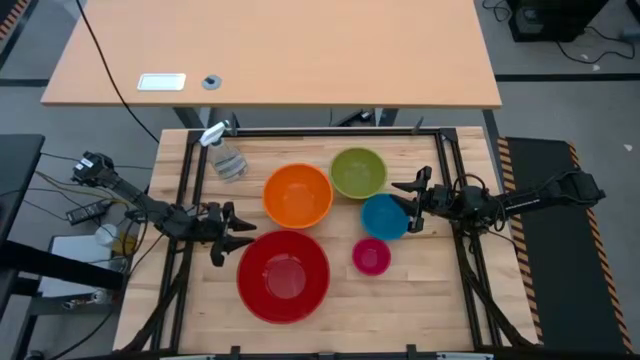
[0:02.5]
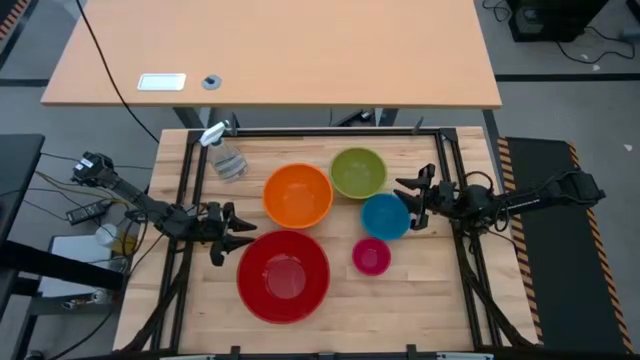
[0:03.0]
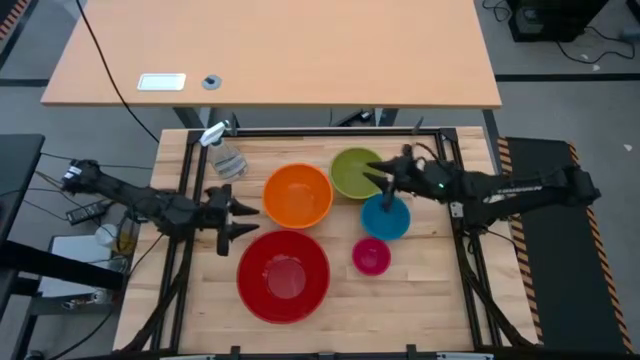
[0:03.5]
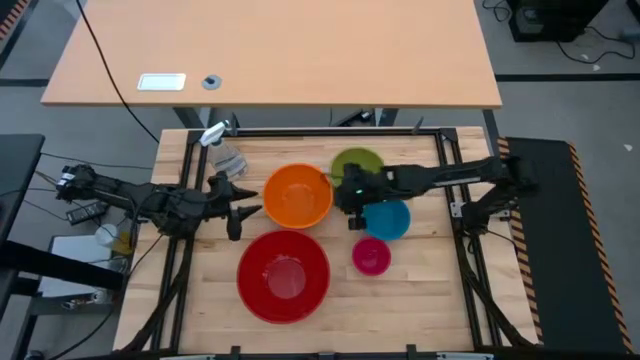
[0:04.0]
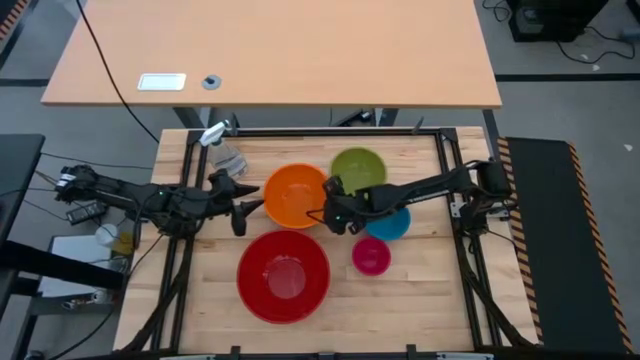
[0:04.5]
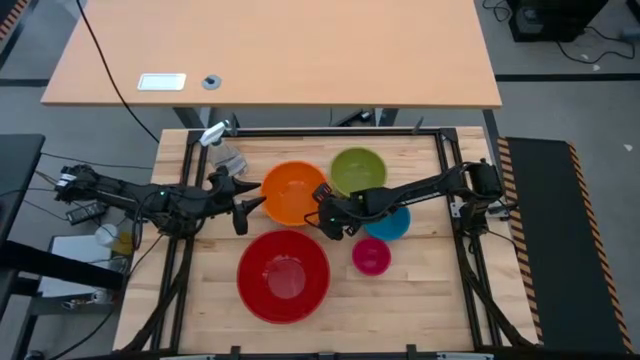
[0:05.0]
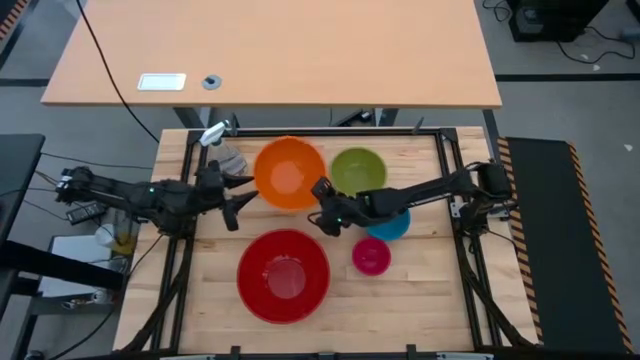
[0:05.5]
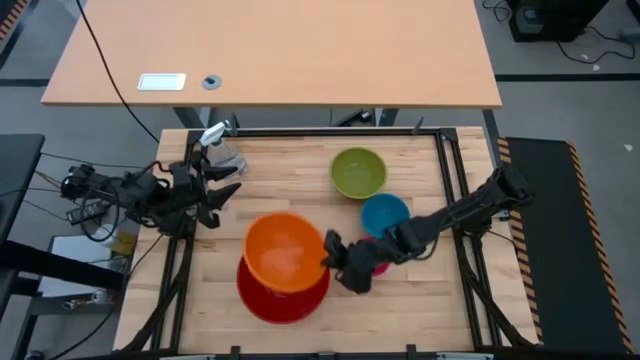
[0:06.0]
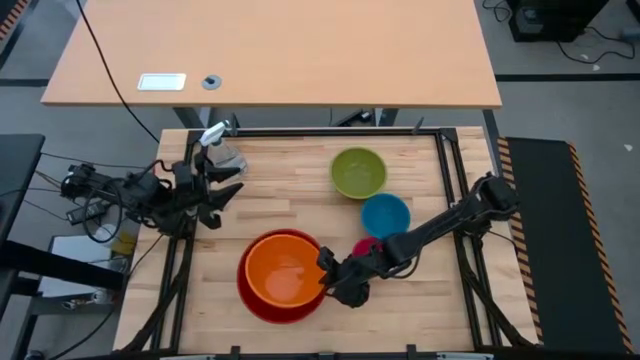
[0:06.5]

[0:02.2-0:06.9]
Stack the orange bowl on top of the red bowl

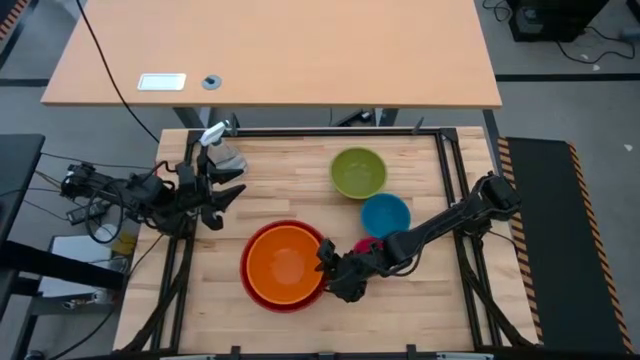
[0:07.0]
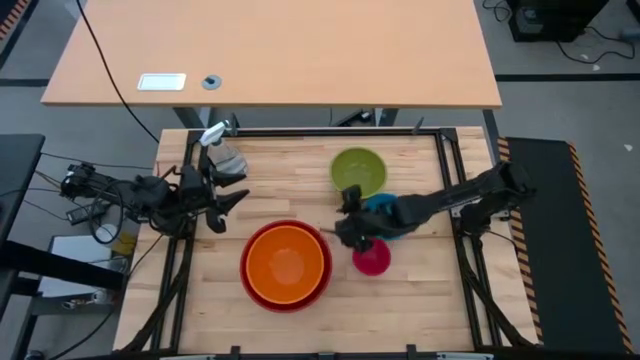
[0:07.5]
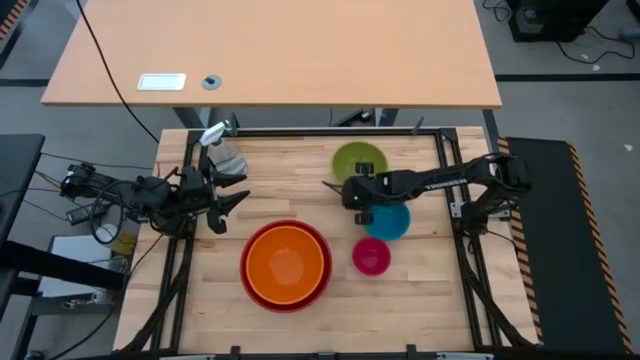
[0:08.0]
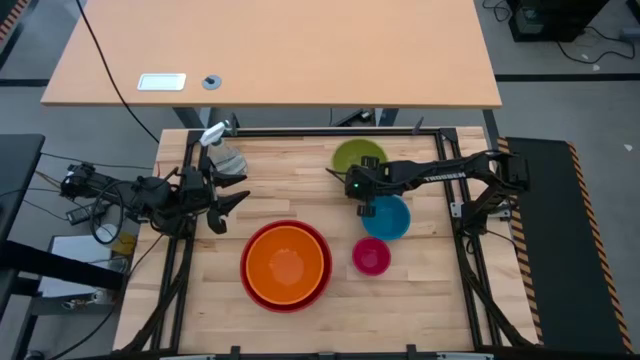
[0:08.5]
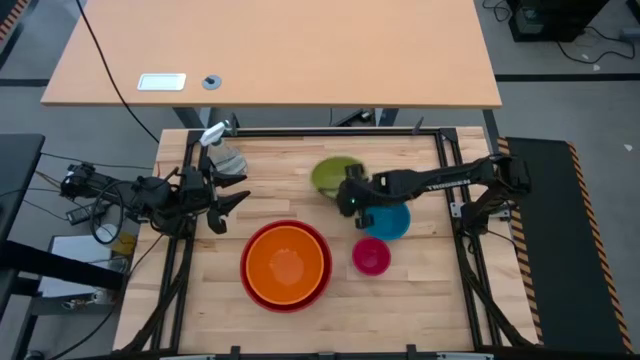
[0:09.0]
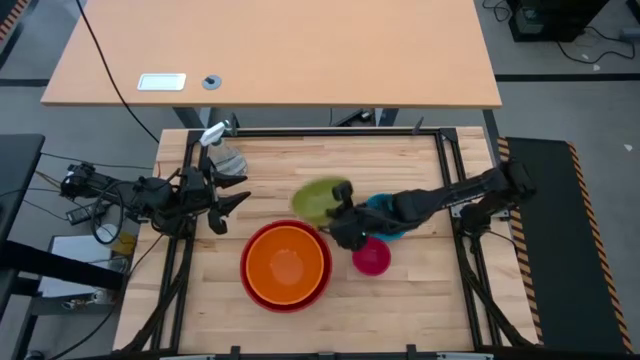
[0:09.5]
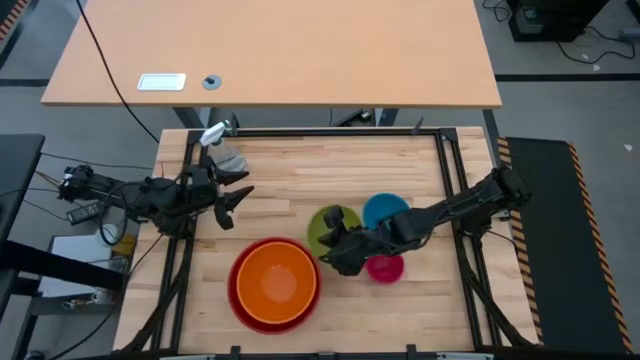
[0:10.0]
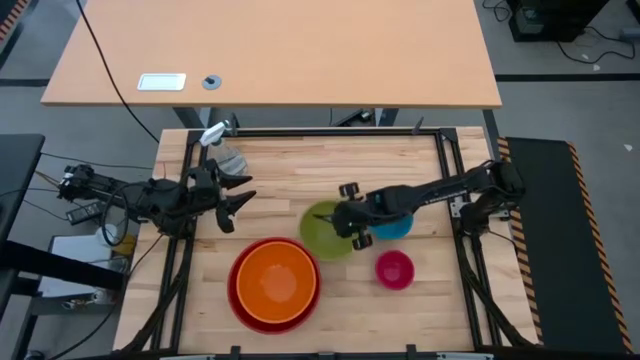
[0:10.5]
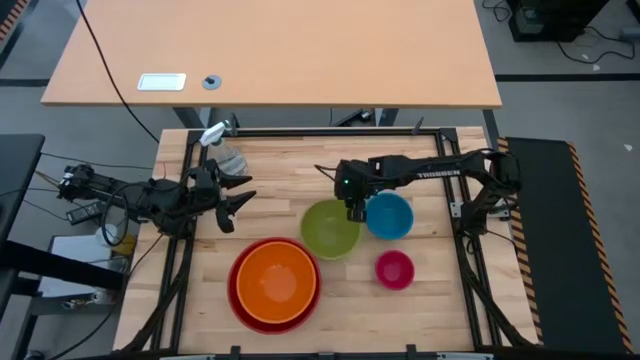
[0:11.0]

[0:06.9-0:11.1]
Stack the green bowl on top of the orange bowl

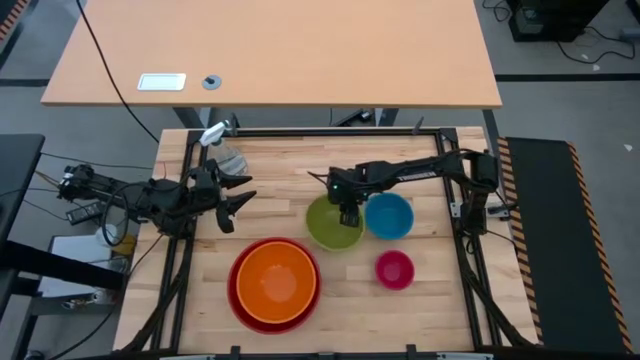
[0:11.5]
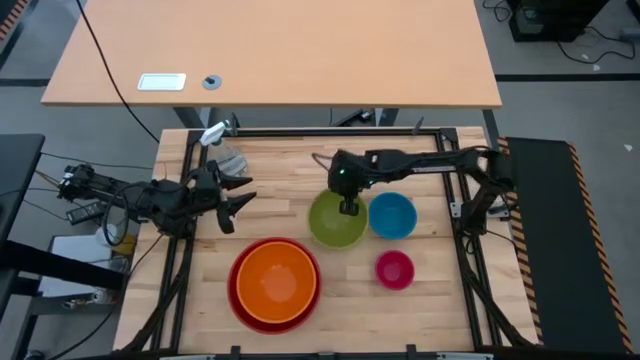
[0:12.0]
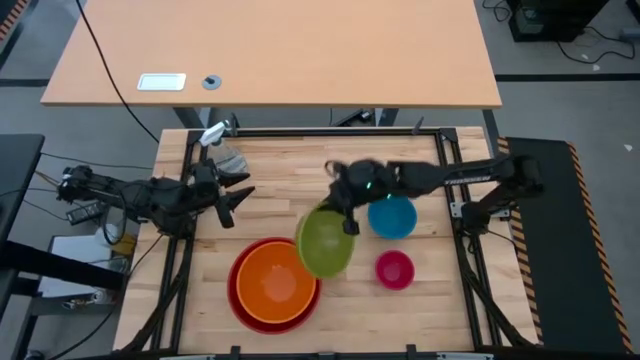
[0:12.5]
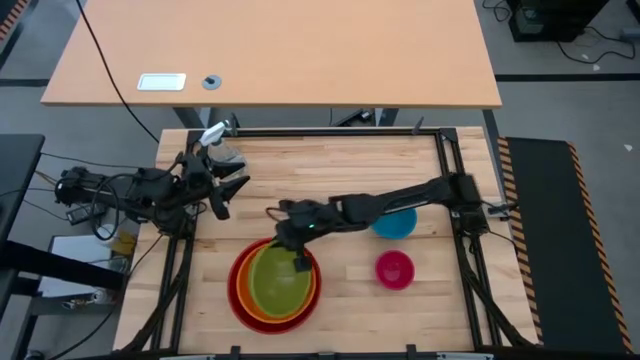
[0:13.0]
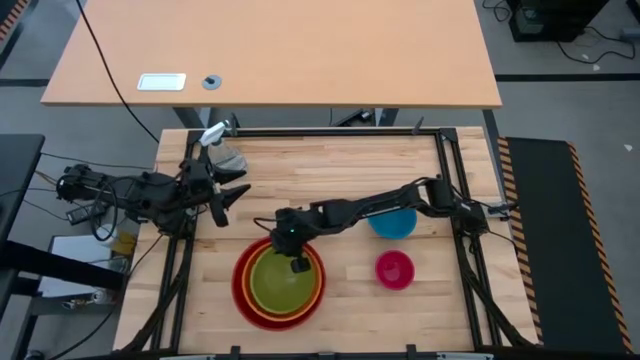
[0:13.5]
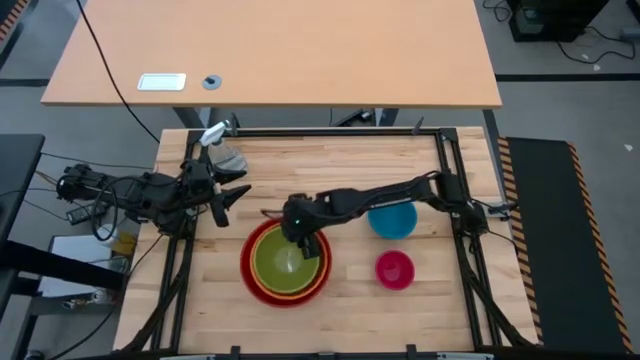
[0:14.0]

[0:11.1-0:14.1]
Stack the green bowl on top of the orange bowl

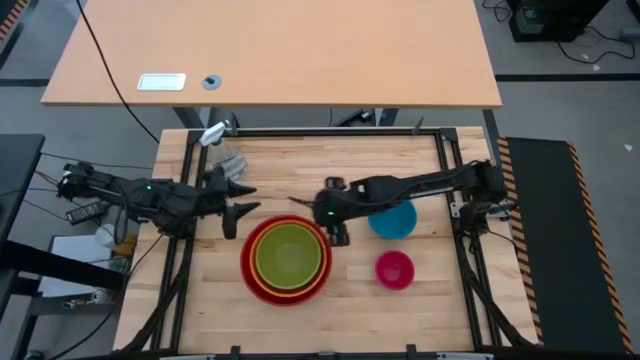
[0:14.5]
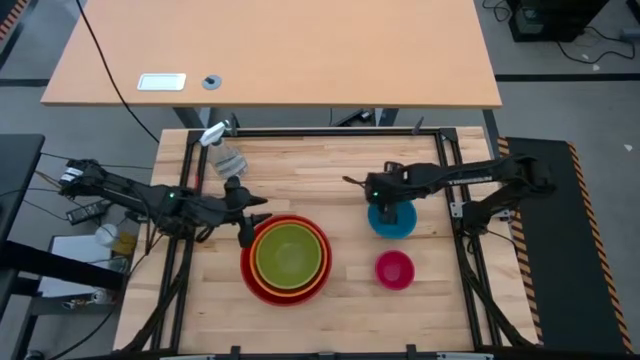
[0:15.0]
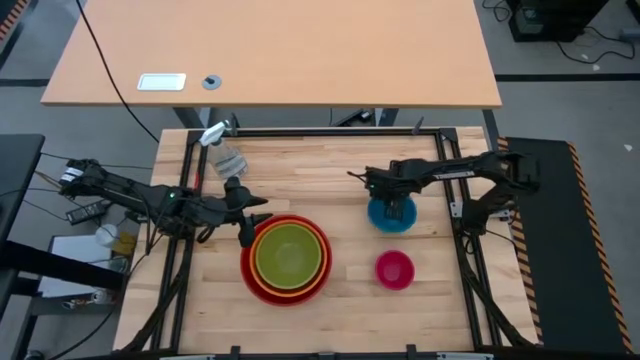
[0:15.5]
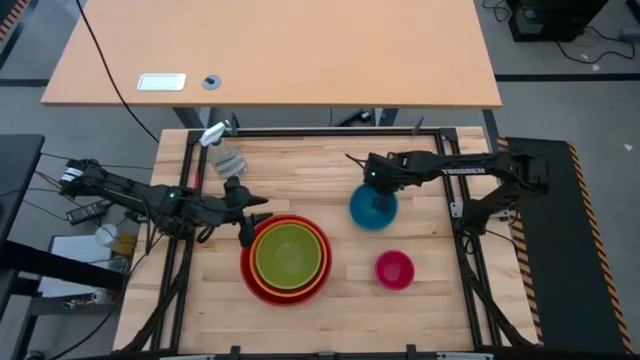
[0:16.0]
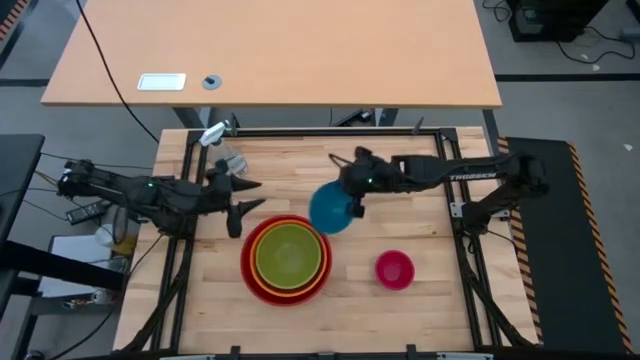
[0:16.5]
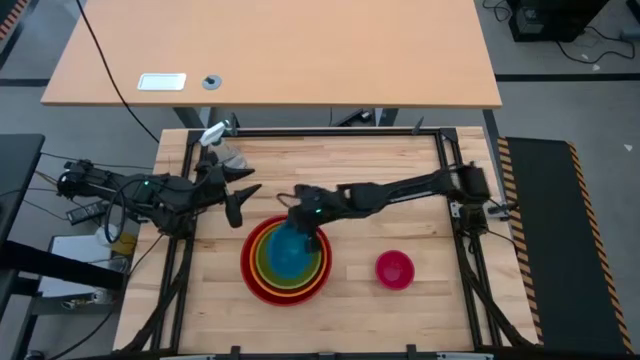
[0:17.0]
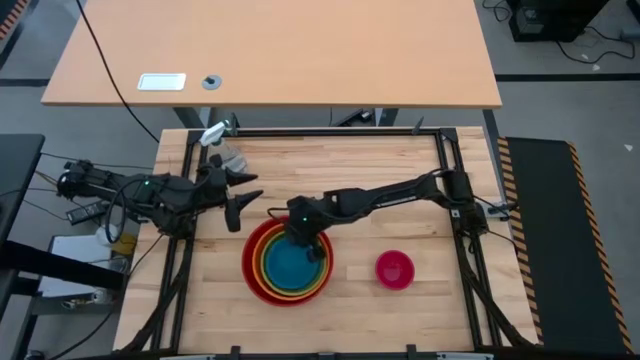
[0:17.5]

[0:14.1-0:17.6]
Stack the blue bowl on top of the green bowl

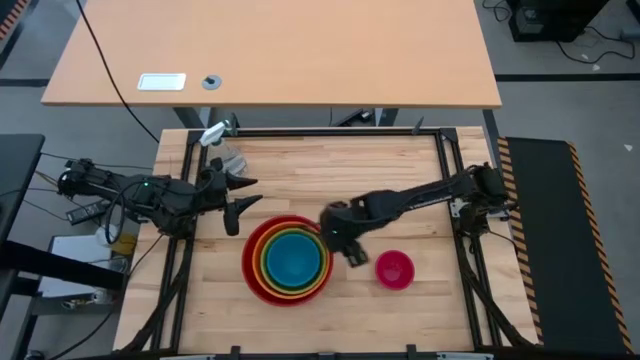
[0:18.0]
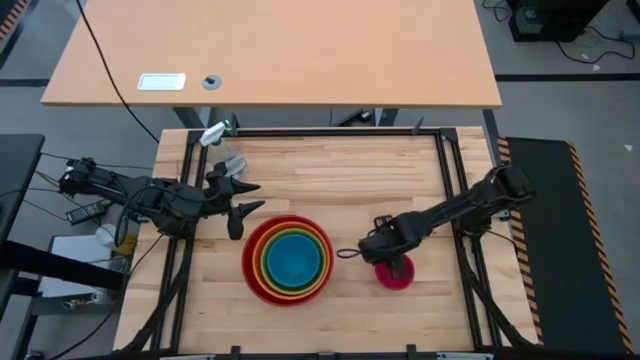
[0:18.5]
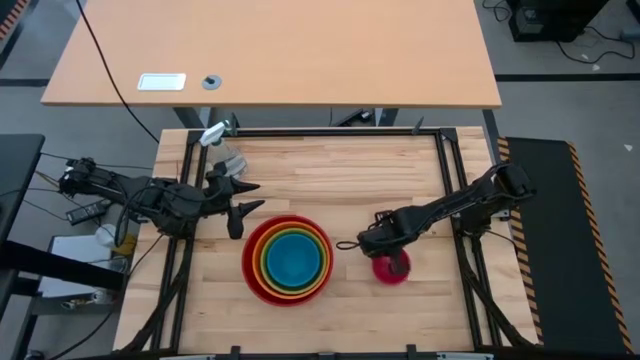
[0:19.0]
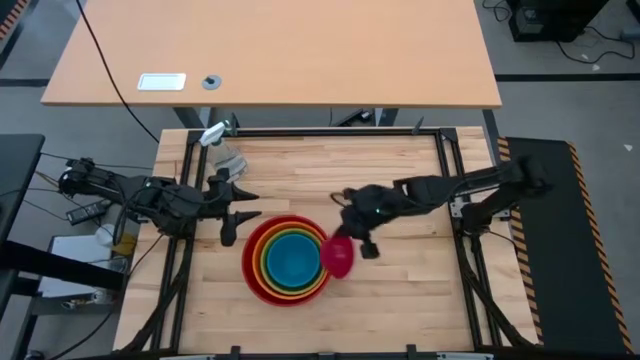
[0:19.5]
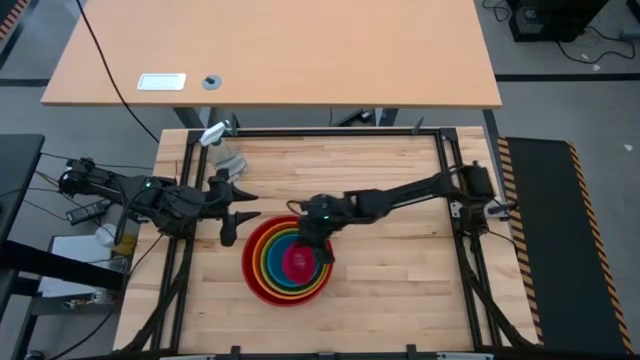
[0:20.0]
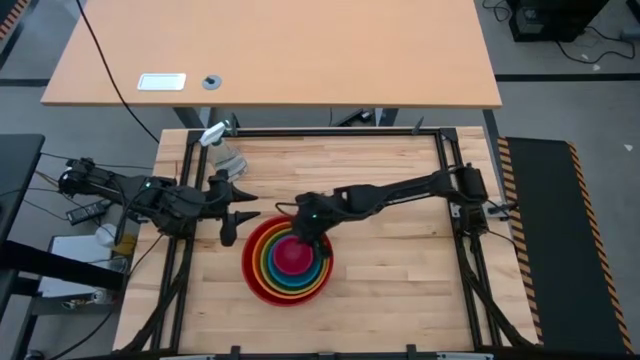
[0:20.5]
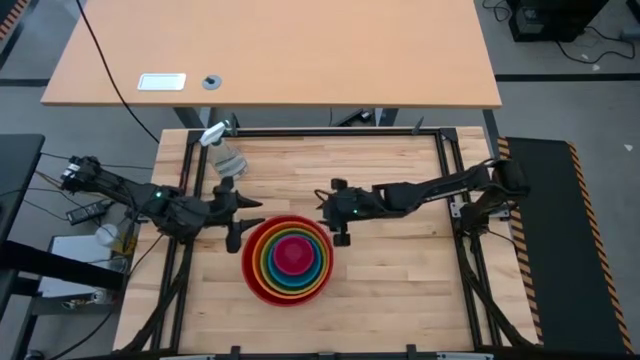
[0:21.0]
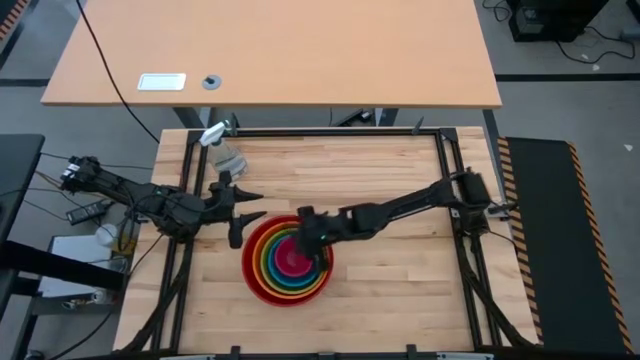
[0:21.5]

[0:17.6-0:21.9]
Stack the pink bowl on top of the blue bowl
